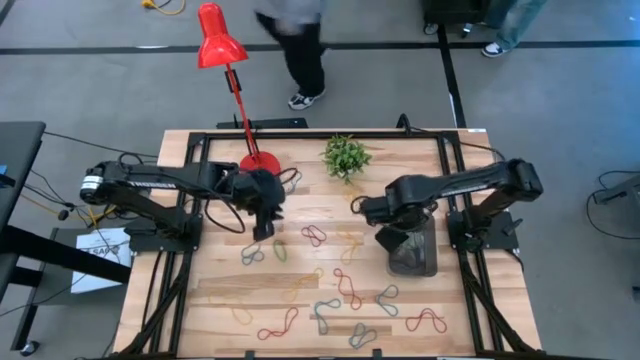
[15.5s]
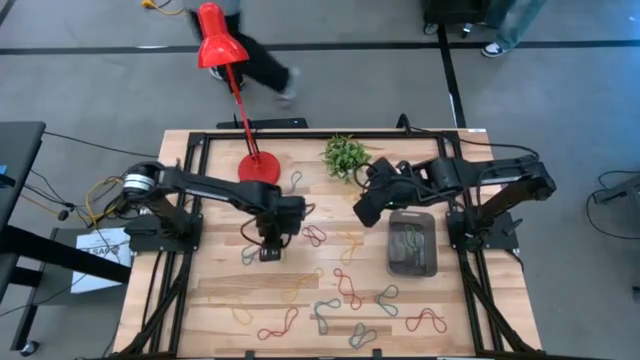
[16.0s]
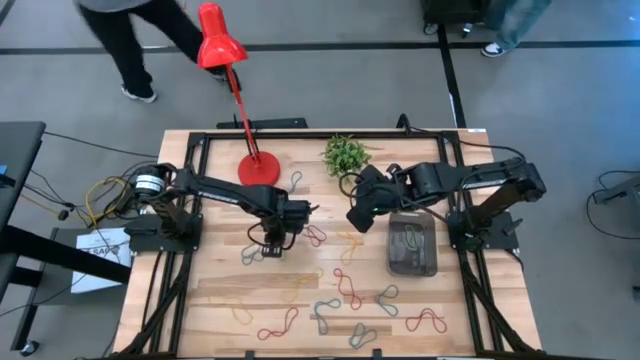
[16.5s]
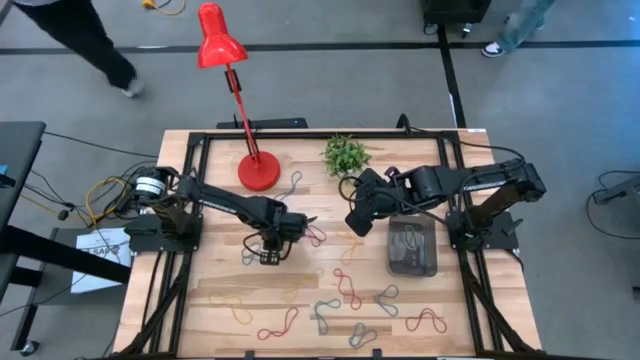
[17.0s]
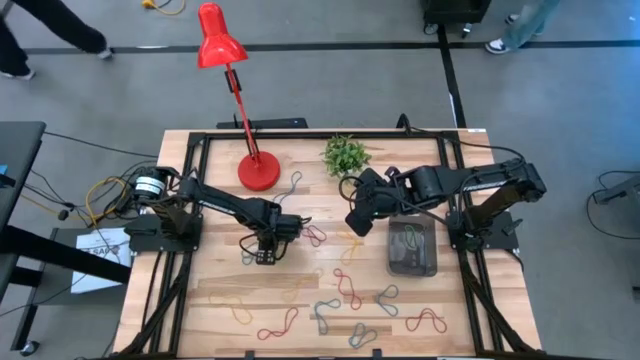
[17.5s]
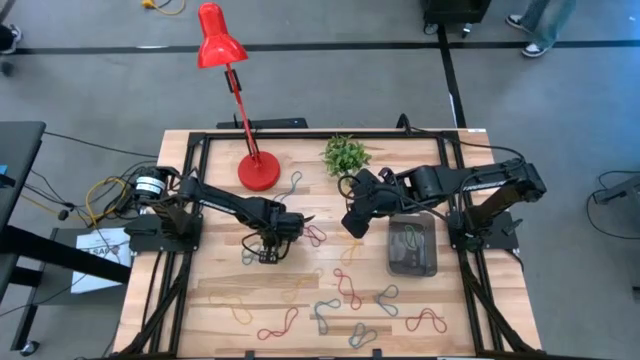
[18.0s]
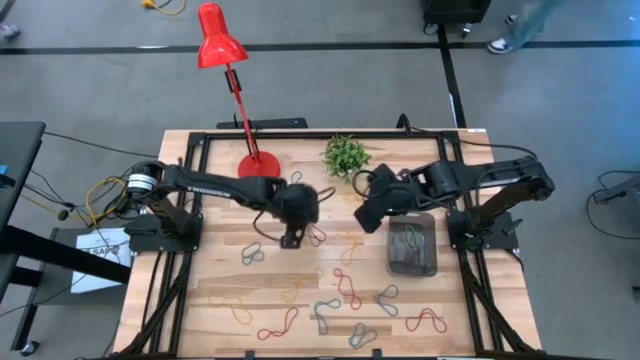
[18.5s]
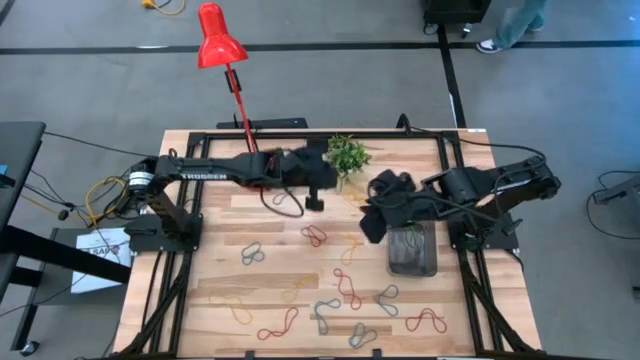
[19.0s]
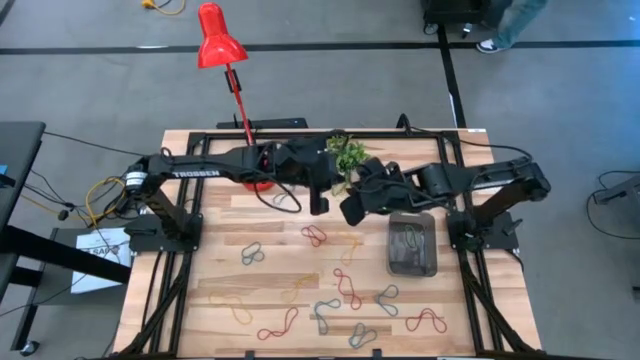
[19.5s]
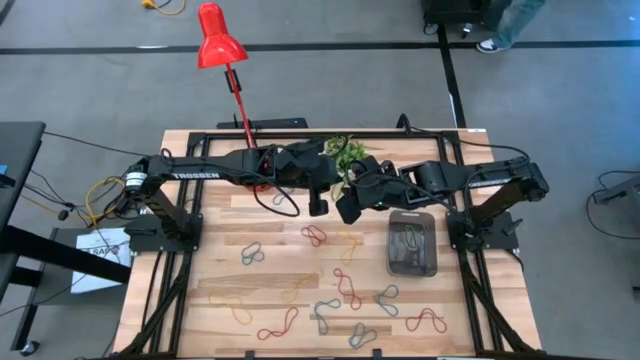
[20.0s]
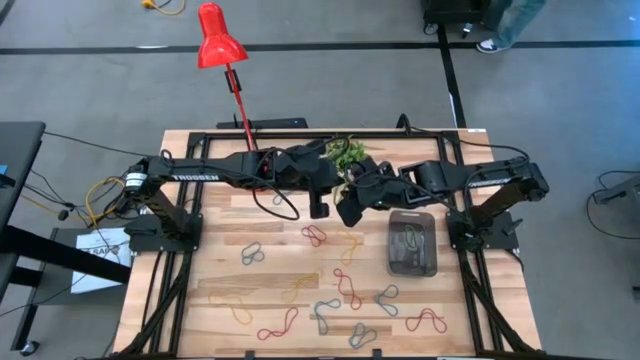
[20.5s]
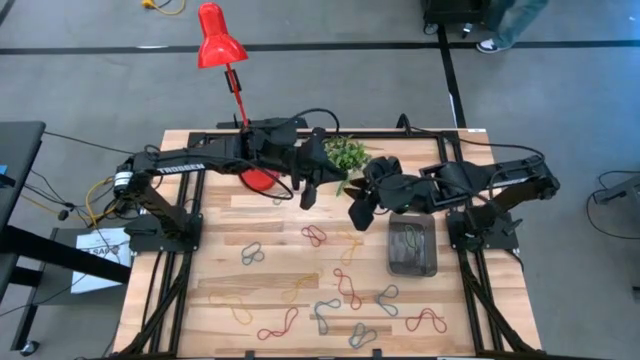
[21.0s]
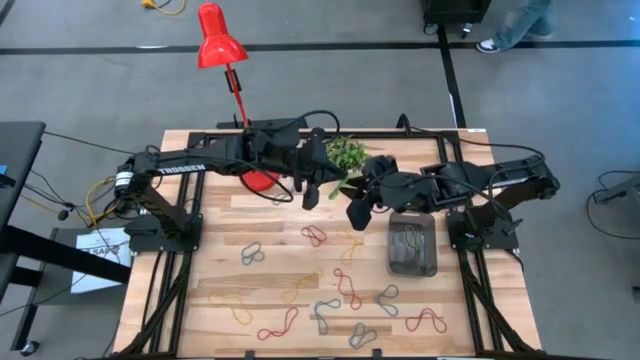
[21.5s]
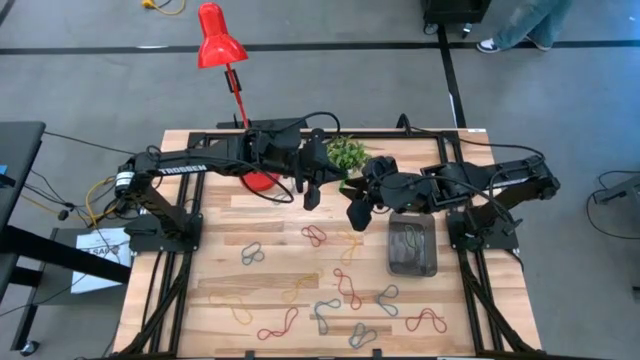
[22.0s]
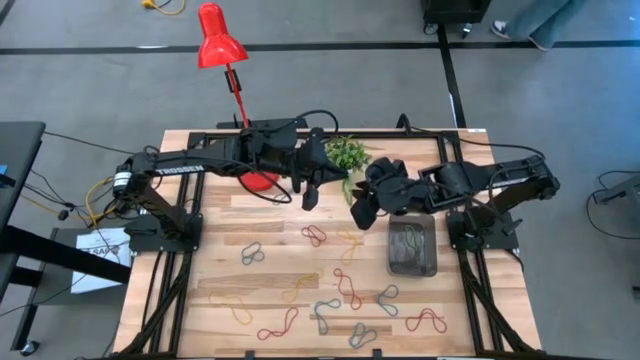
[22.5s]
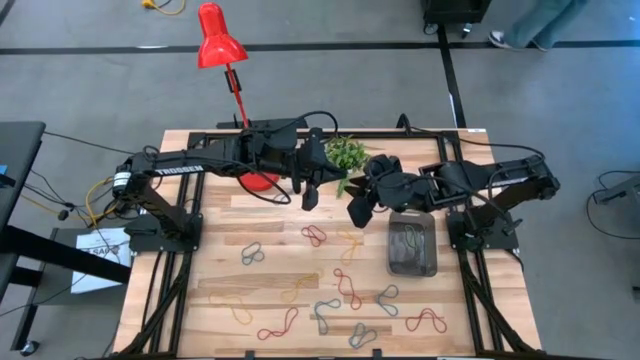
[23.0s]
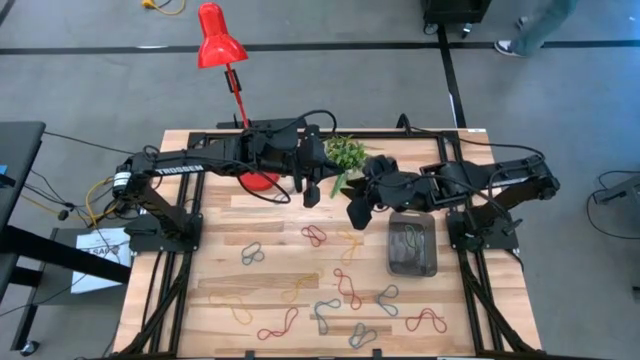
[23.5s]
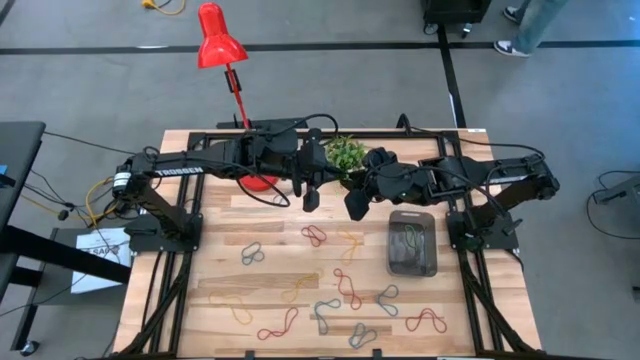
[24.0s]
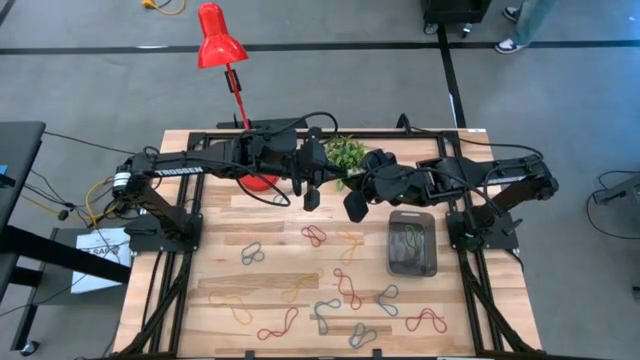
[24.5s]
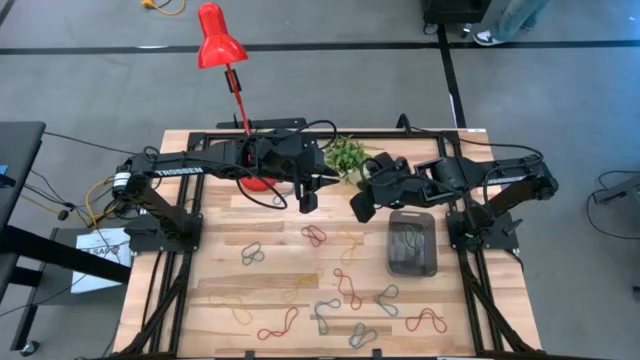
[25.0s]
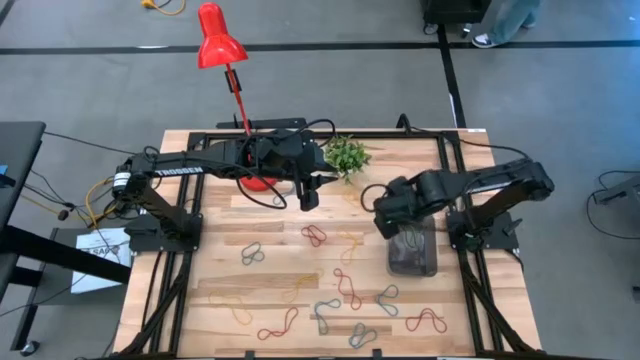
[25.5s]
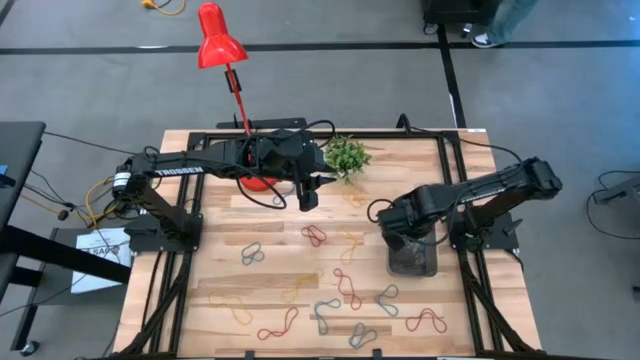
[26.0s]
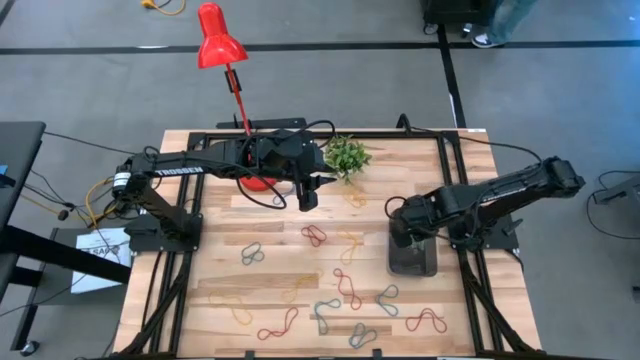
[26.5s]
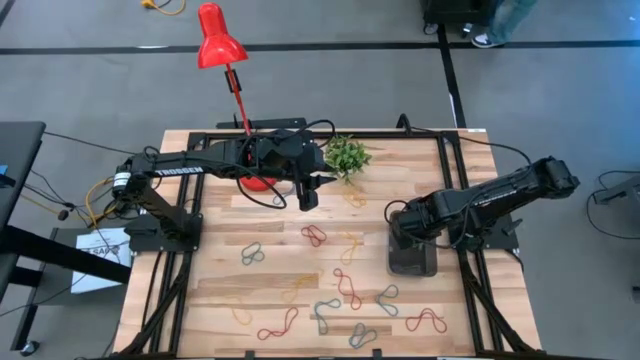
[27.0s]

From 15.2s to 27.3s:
Task: Pick and place items into bin
Put the green rubber band into the black bin

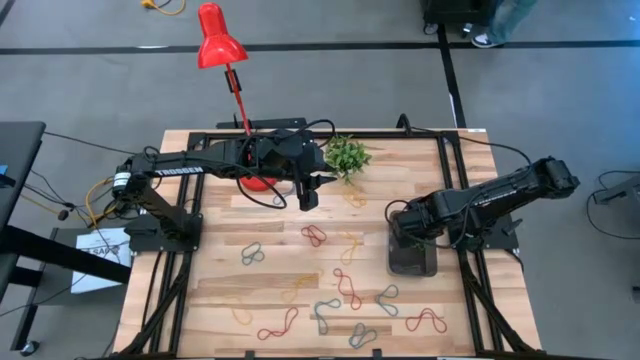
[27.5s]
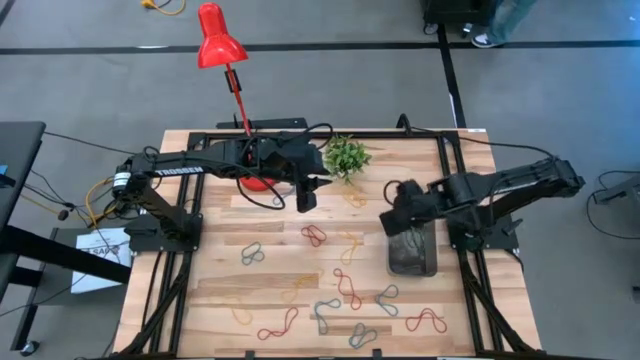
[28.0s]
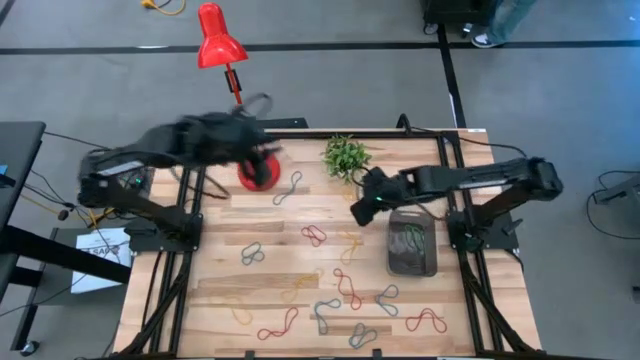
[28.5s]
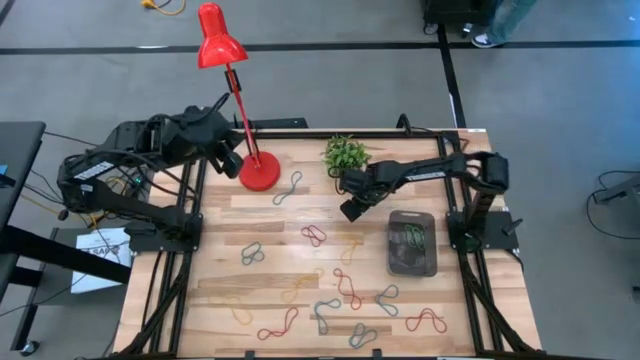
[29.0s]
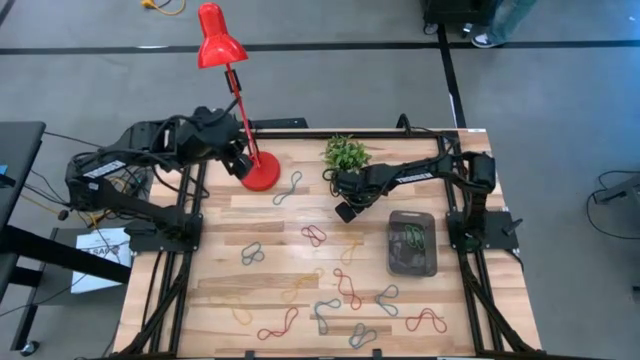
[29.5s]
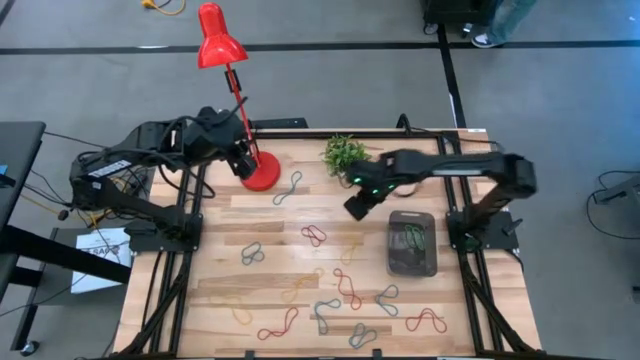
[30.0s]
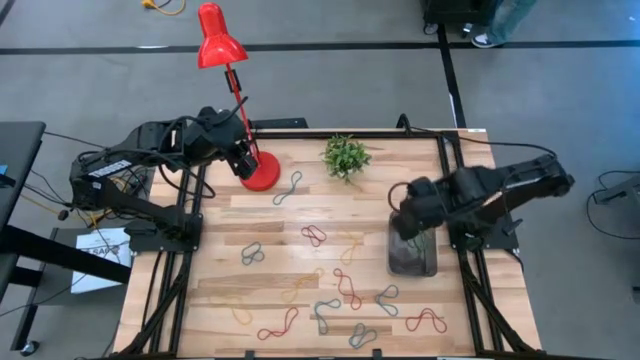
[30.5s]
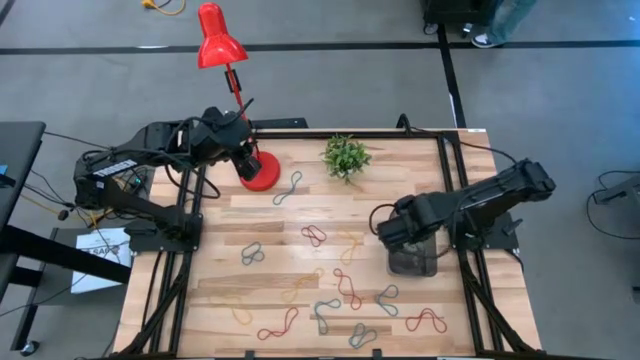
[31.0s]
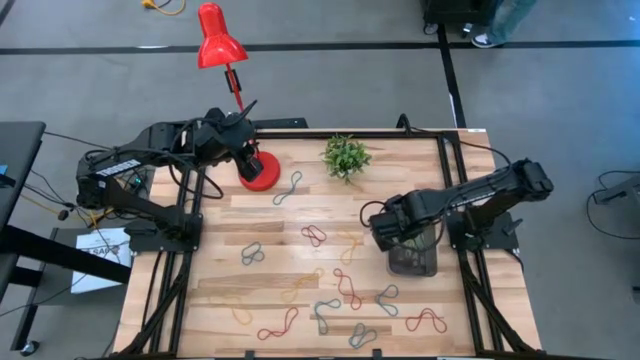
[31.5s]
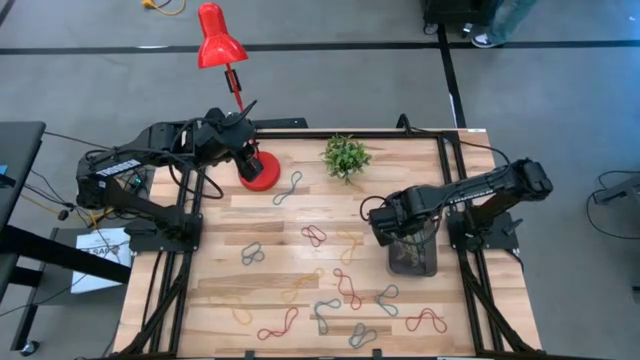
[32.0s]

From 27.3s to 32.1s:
Put the yellow rubber band into the black bin

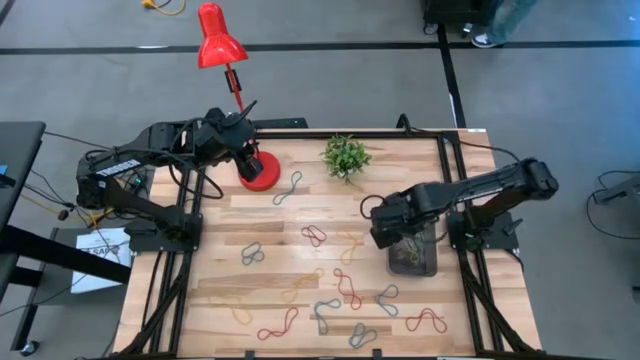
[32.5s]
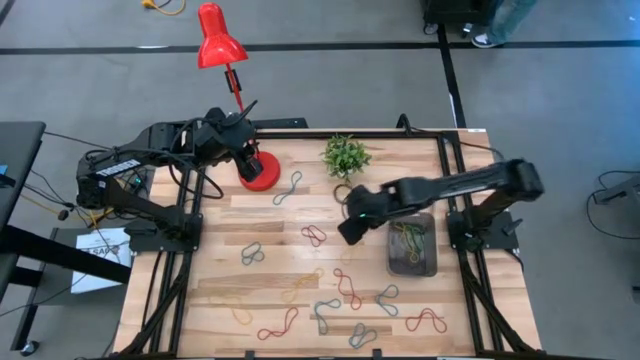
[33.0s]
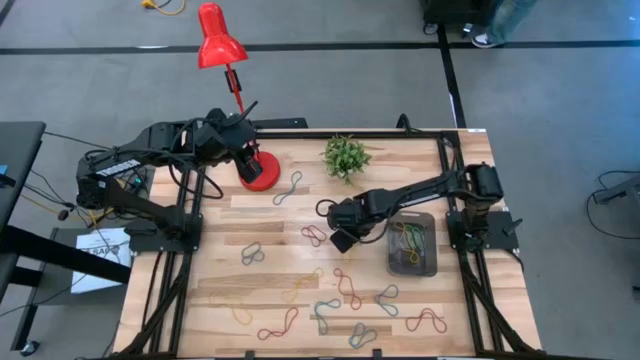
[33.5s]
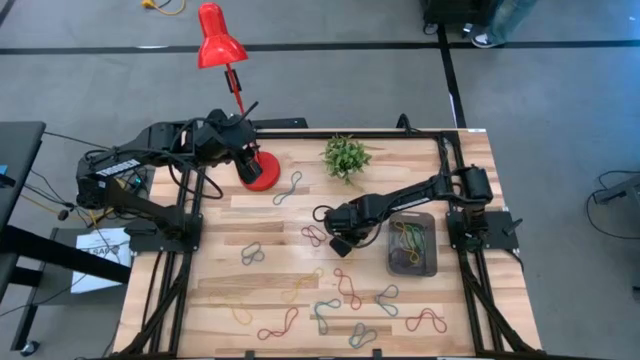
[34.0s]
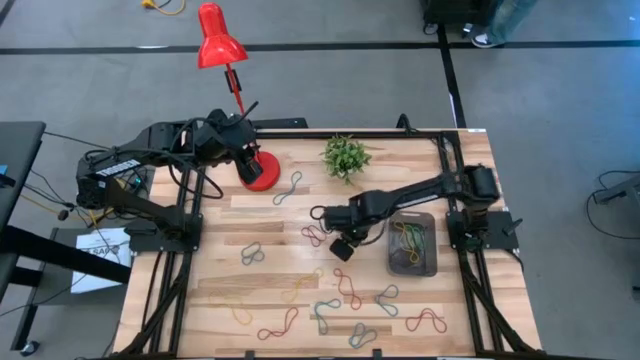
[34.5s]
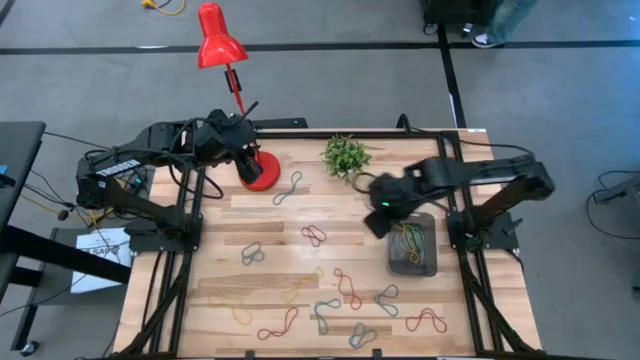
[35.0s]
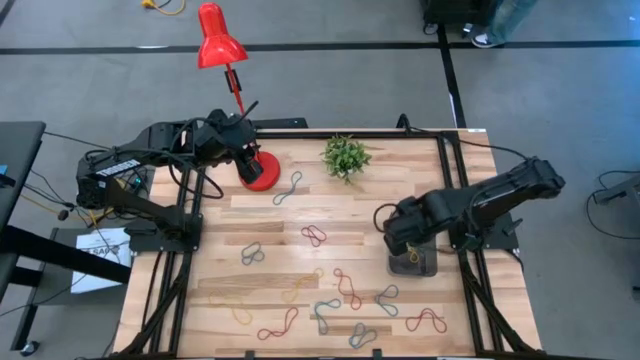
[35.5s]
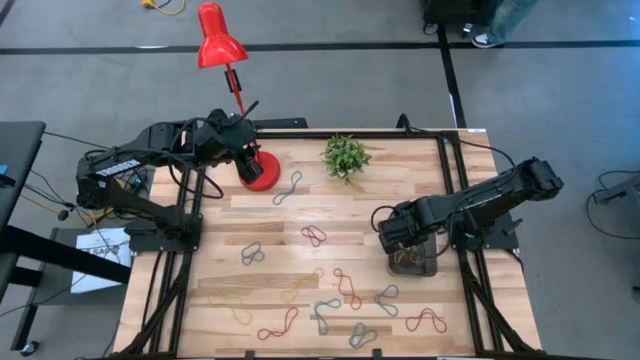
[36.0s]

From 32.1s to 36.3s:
Put the yellow rubber band into the black bin
